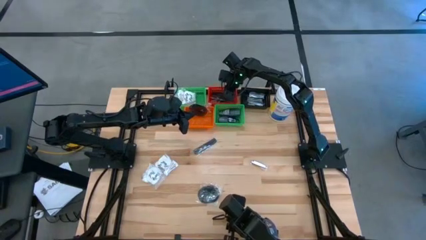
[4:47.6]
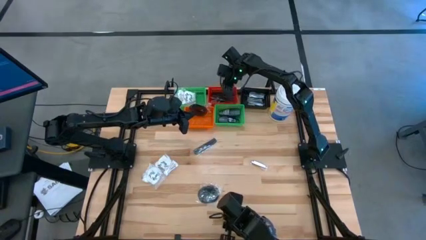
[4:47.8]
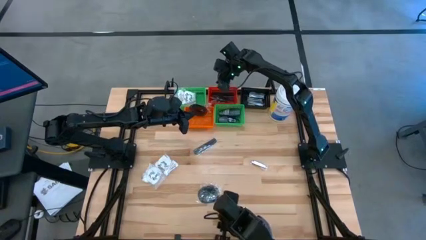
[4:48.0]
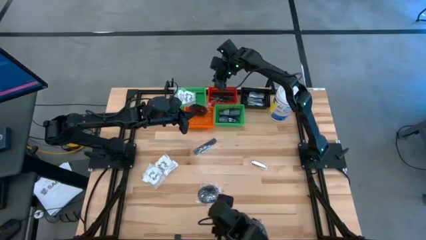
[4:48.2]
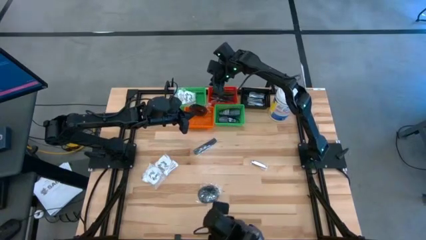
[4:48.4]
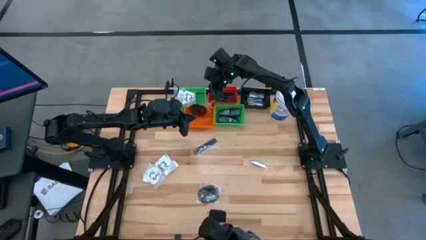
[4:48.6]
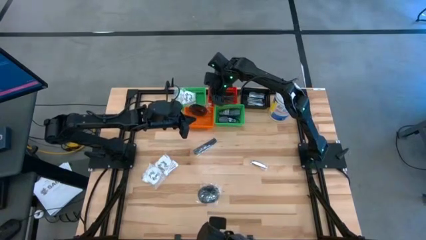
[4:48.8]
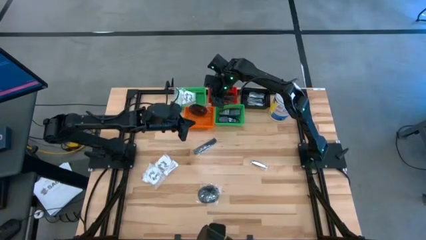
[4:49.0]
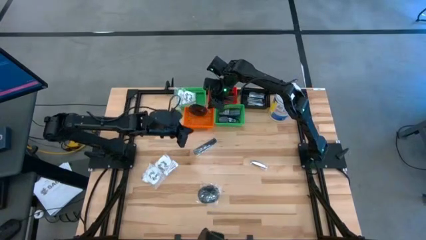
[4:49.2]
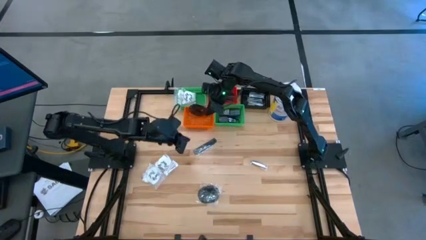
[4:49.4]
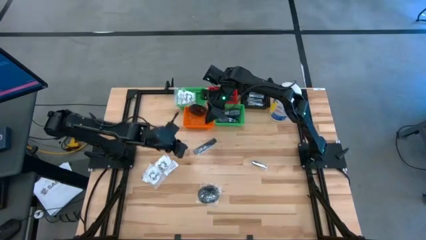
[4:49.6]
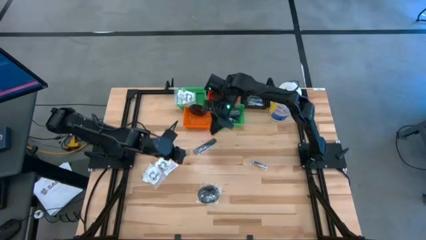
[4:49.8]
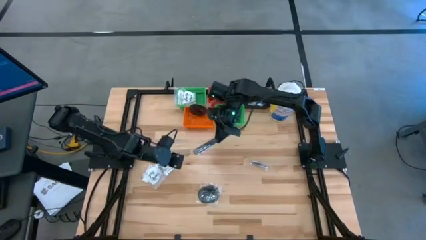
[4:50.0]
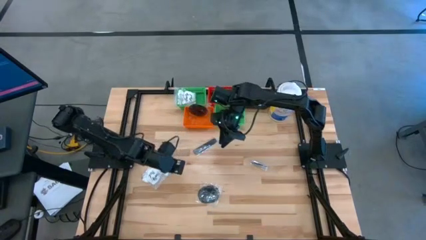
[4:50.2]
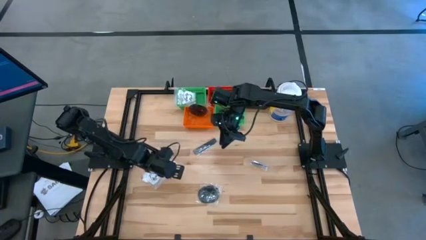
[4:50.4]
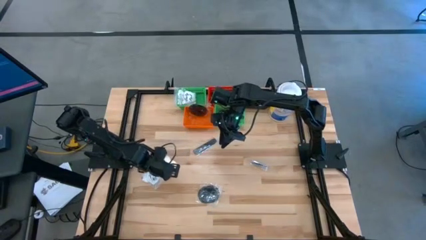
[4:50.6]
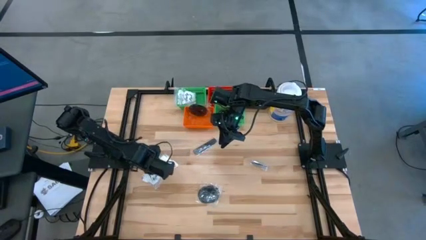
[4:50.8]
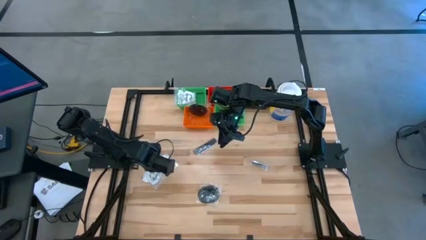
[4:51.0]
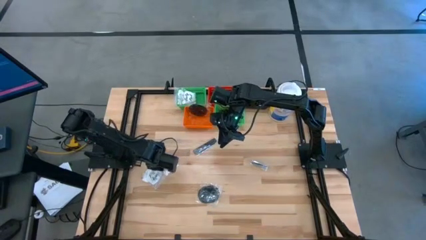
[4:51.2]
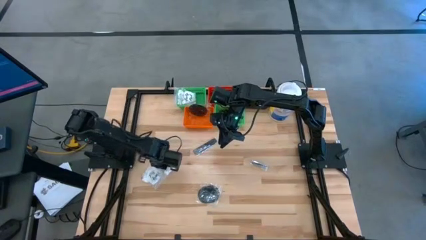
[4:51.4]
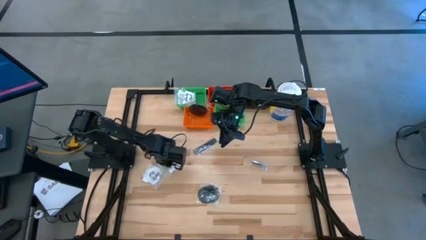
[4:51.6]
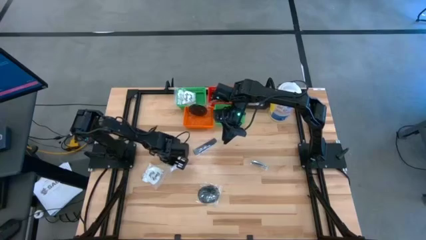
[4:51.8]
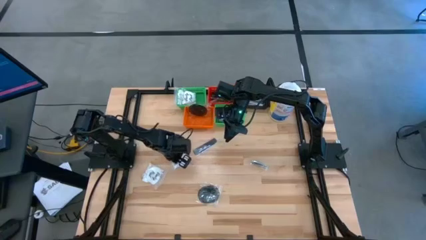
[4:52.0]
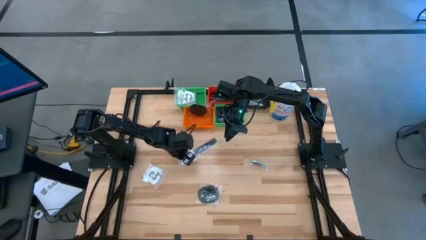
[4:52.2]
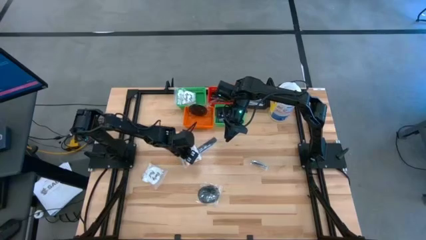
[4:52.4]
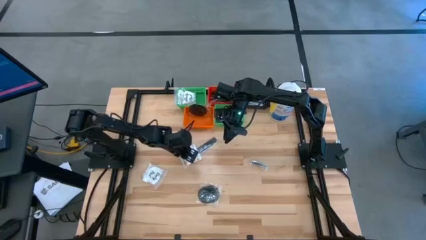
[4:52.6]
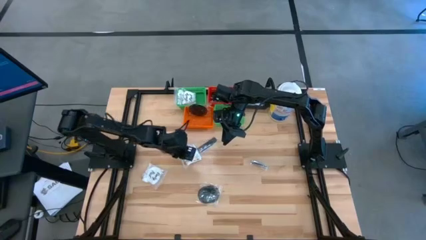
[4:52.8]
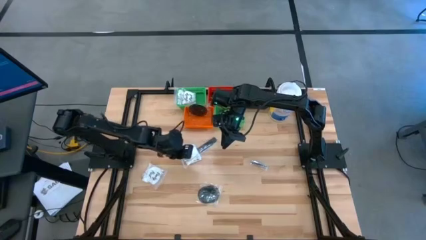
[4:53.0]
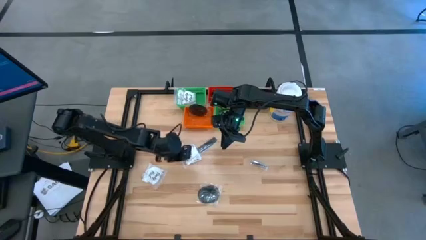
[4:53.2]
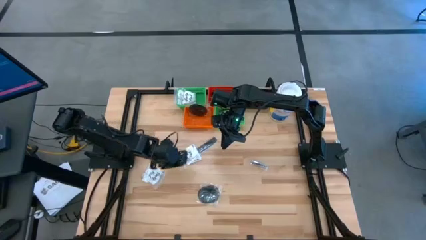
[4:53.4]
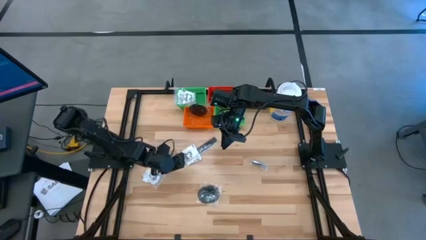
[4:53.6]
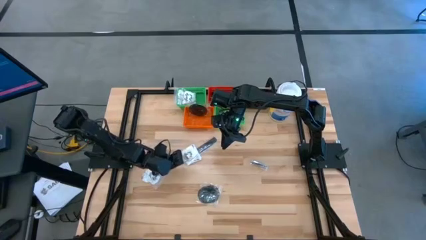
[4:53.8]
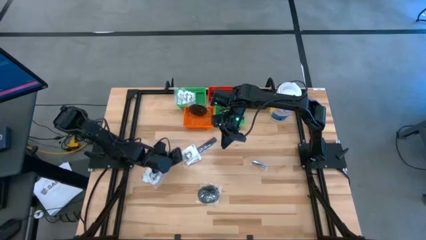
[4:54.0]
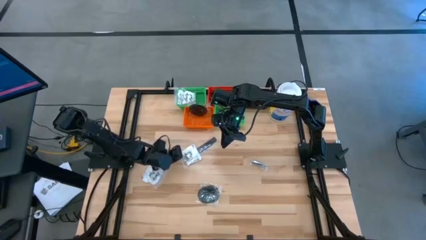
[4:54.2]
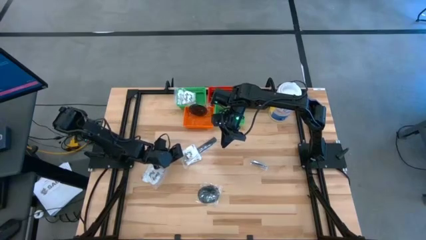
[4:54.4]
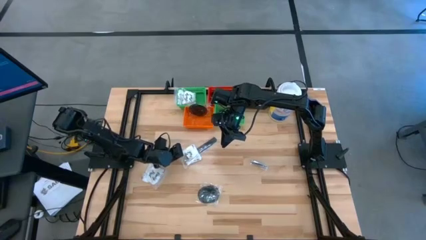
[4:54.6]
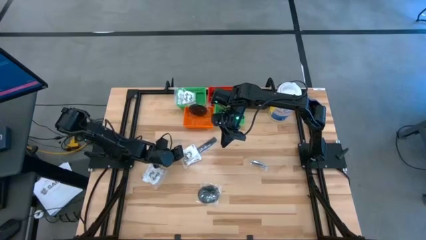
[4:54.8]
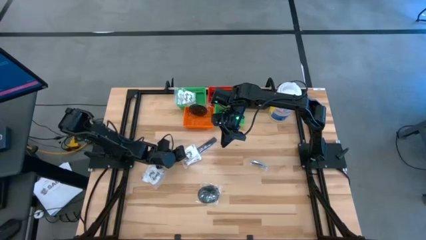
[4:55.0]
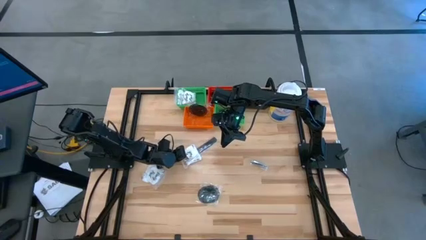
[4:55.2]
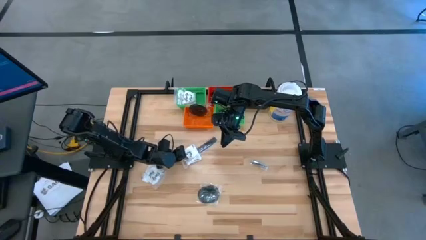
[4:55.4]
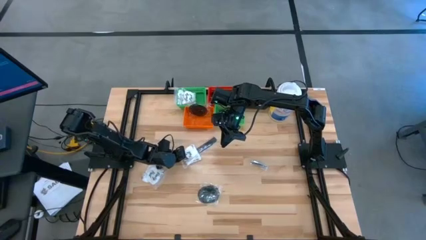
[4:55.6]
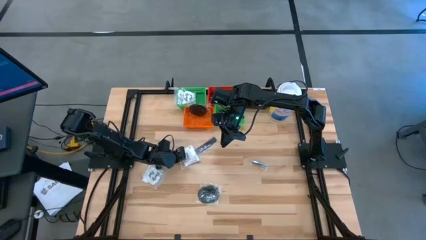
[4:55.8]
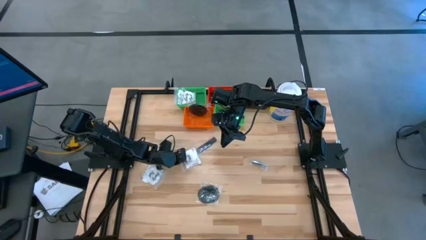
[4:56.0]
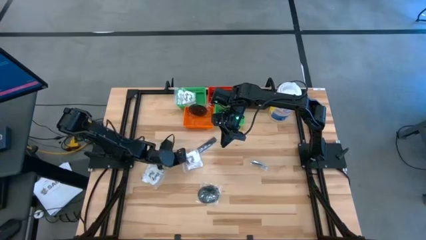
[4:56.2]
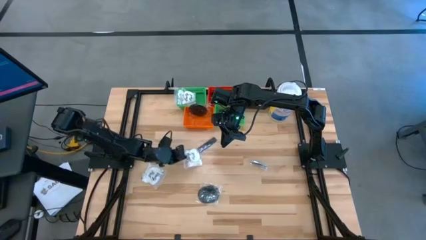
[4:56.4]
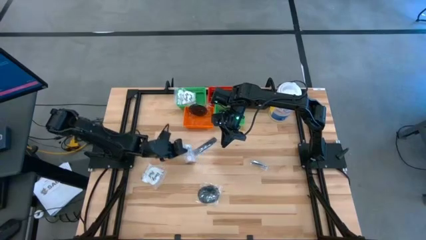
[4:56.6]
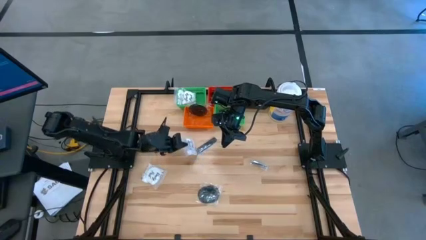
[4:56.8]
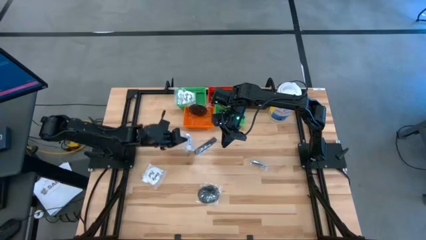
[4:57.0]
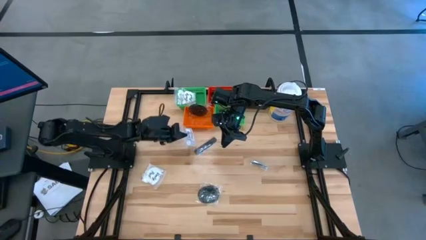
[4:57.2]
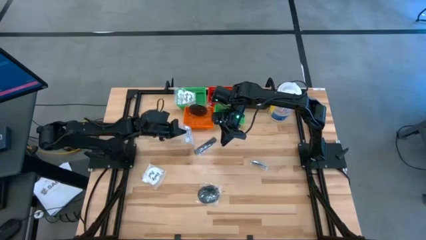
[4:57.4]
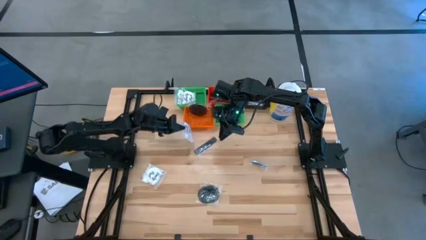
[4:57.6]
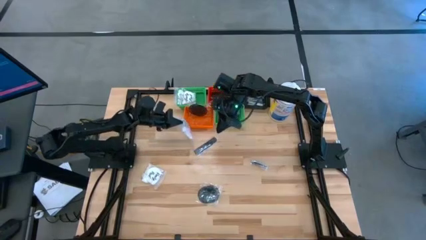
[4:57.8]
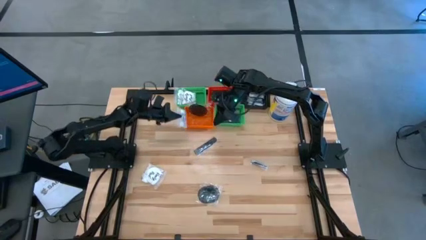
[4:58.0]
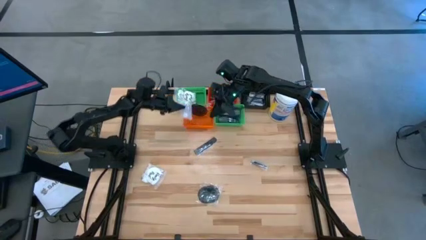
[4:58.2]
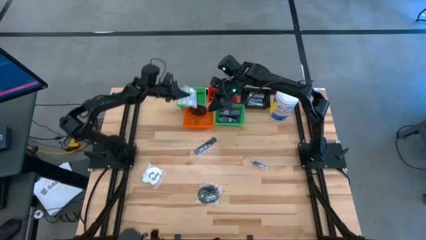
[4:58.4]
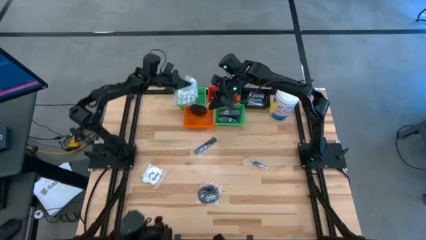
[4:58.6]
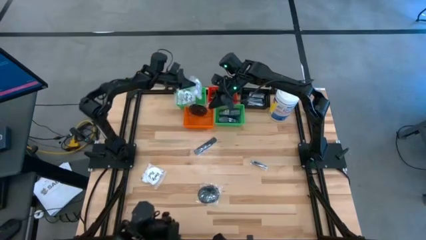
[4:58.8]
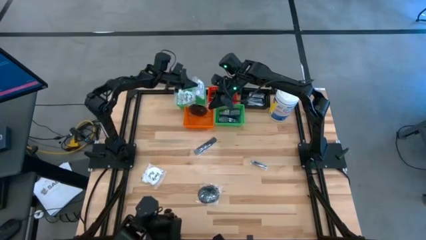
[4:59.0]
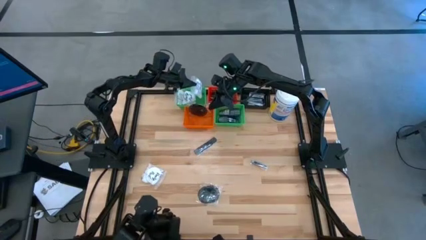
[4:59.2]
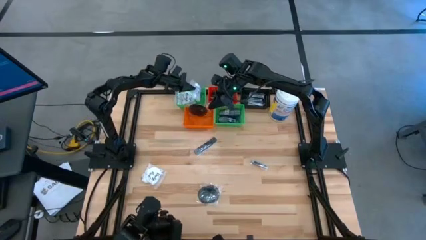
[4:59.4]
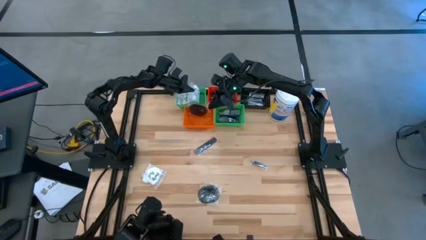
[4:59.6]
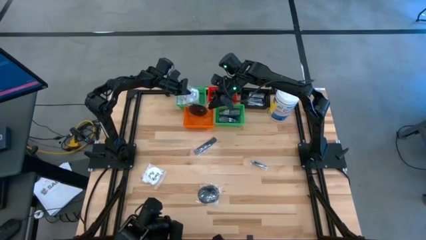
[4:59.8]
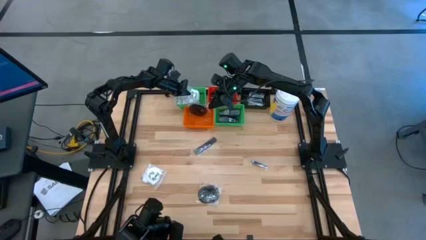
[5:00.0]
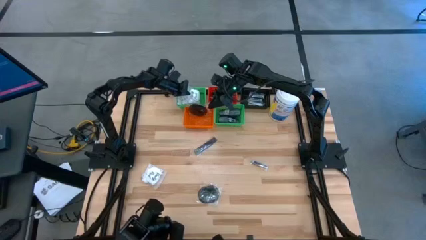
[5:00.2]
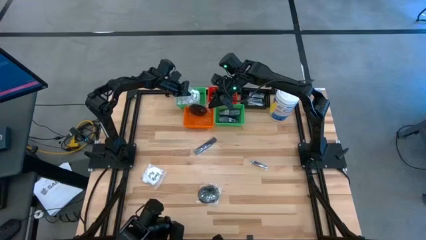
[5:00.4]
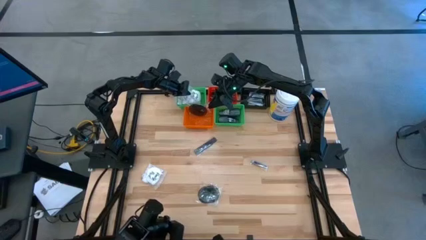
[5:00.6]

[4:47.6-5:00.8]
Task: Pick & Place Travel size toiletries
Put the vanity pack into the green bin

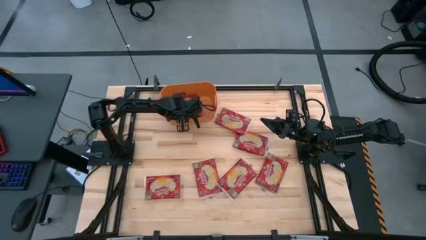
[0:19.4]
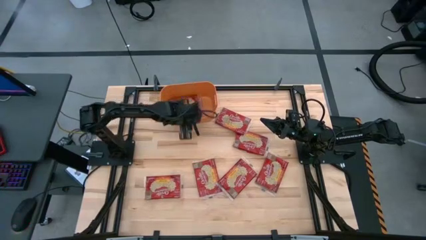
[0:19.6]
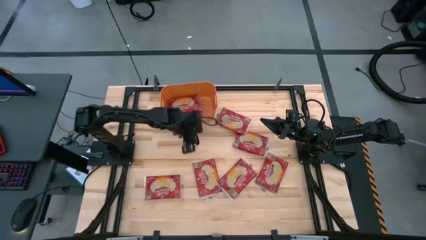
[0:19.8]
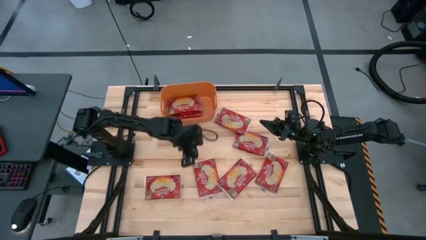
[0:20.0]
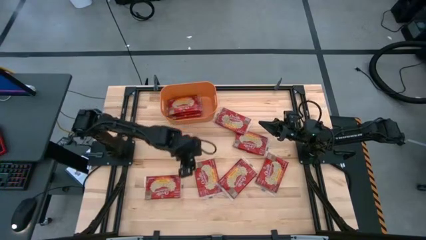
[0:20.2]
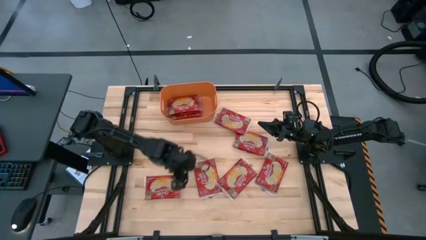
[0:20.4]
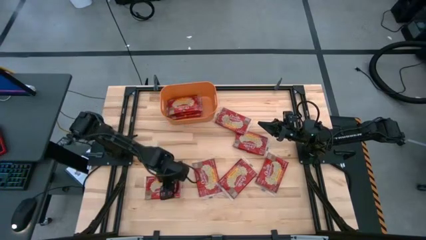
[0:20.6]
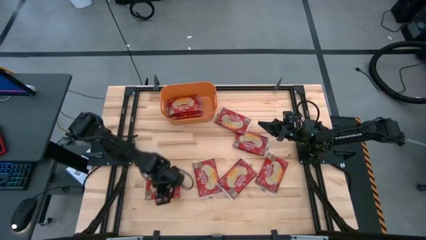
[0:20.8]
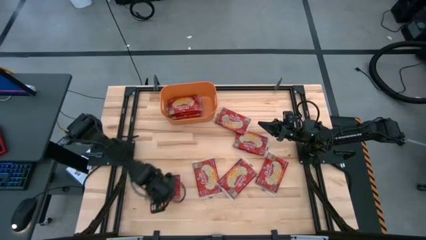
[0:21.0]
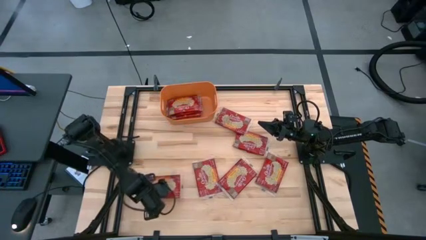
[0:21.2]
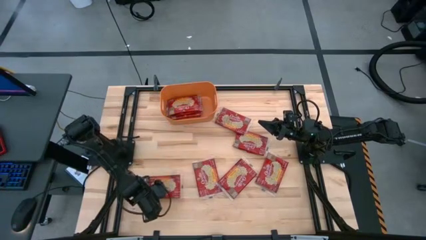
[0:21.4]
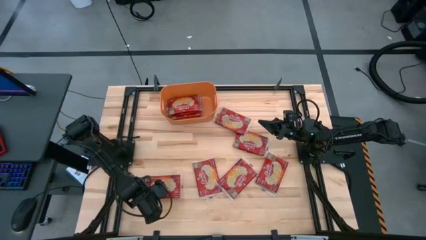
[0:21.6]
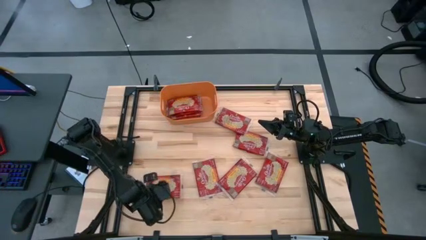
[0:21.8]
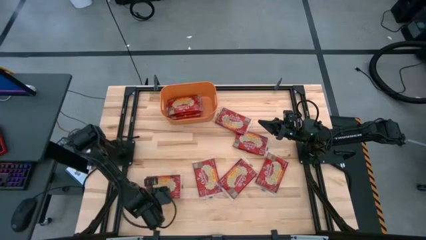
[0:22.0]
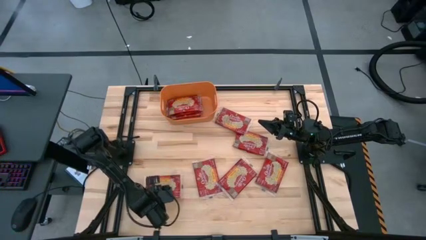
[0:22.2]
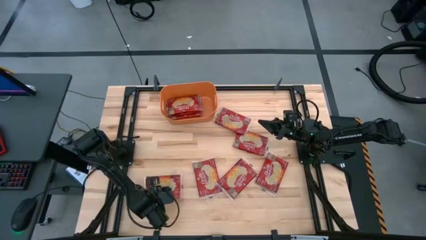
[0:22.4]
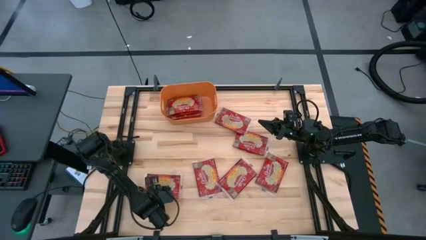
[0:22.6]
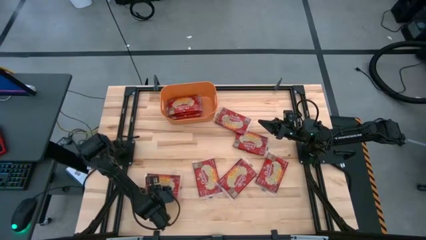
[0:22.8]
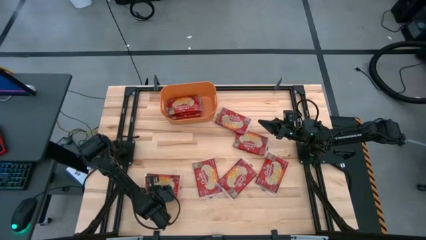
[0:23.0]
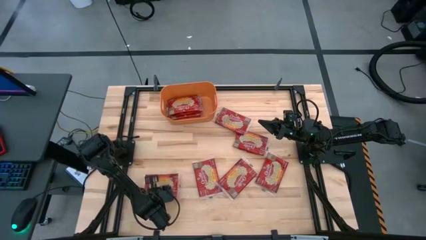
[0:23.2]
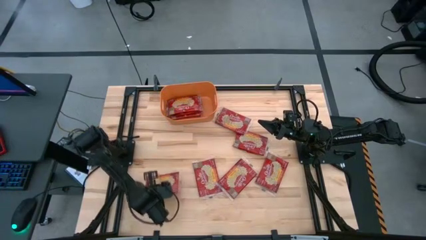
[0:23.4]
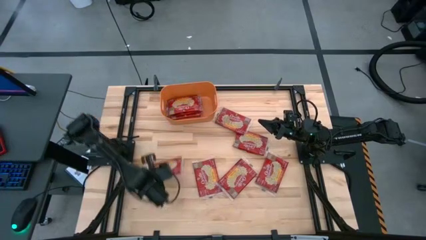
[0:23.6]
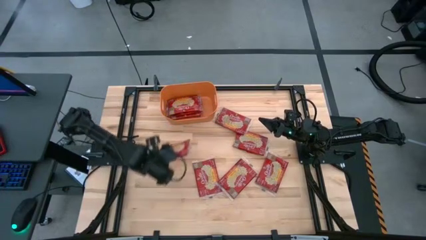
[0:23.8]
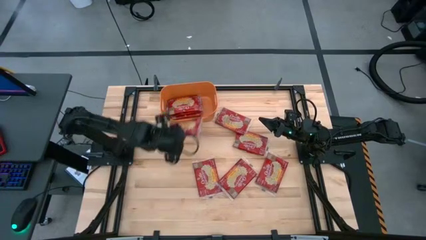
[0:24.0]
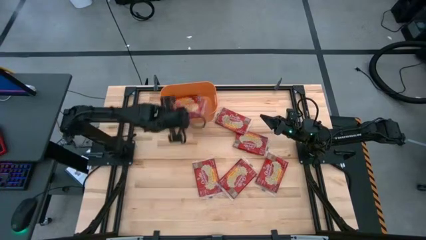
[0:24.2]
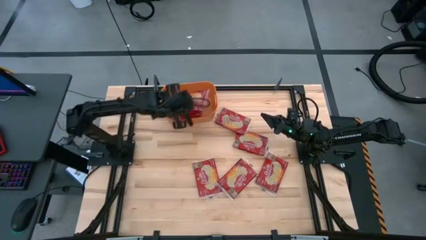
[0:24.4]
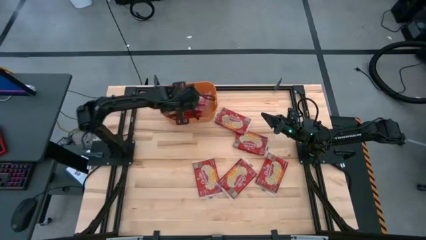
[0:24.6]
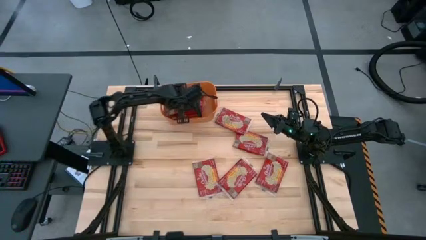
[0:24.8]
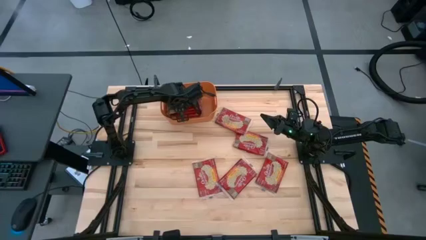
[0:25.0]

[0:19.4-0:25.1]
Task: Sort popcorn bags into baskets
Put the red popcorn bag into the orange bin
